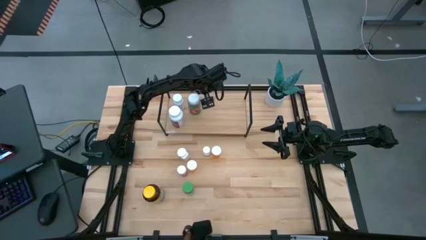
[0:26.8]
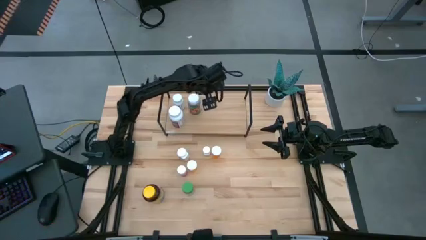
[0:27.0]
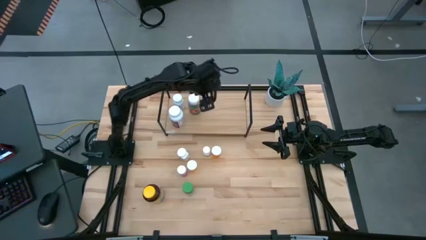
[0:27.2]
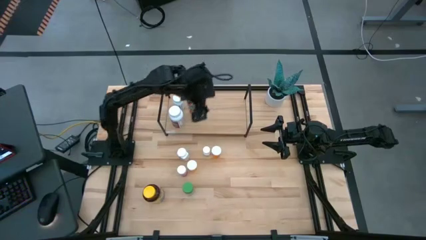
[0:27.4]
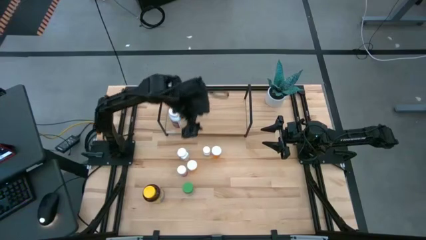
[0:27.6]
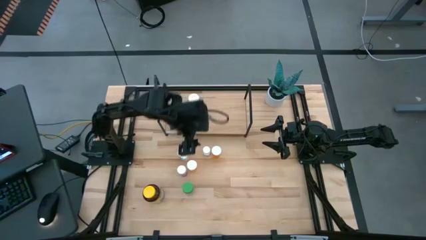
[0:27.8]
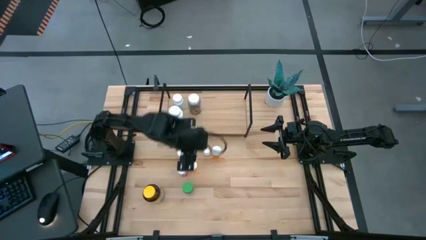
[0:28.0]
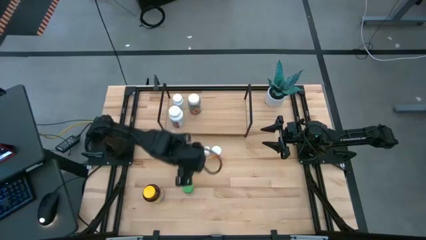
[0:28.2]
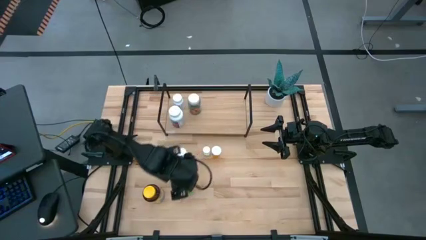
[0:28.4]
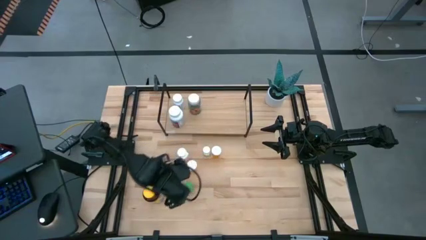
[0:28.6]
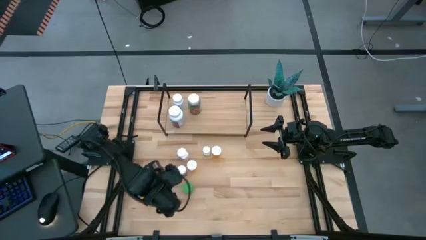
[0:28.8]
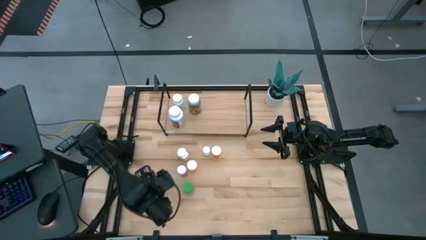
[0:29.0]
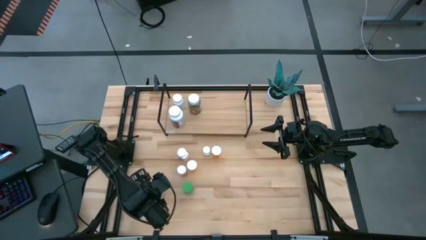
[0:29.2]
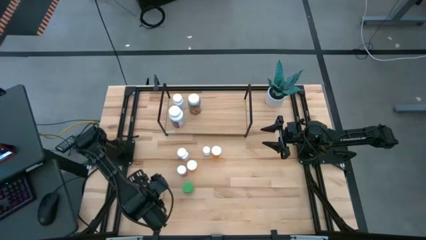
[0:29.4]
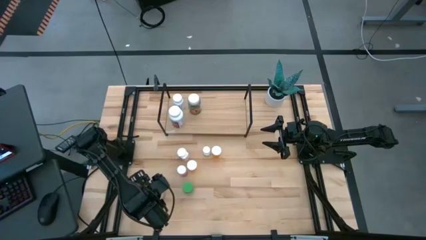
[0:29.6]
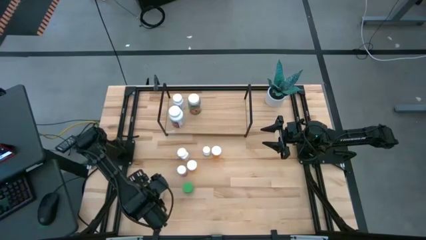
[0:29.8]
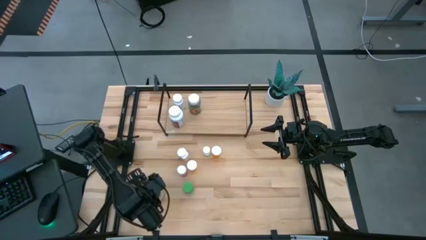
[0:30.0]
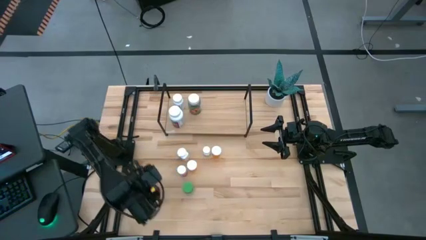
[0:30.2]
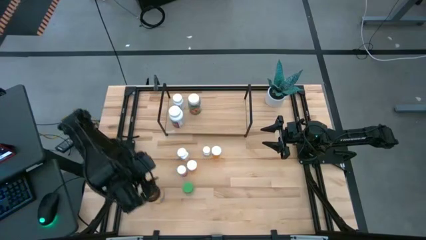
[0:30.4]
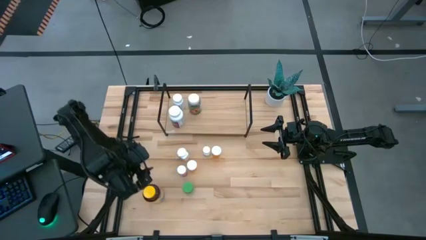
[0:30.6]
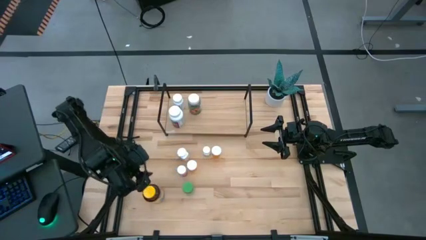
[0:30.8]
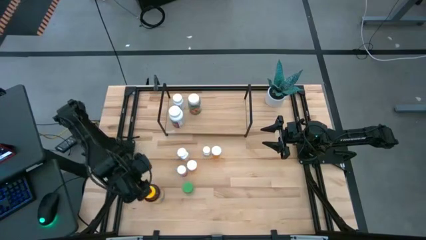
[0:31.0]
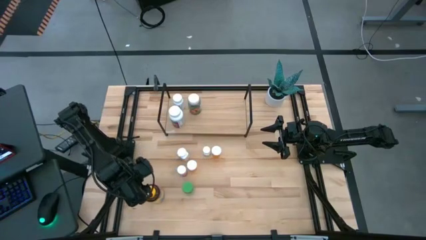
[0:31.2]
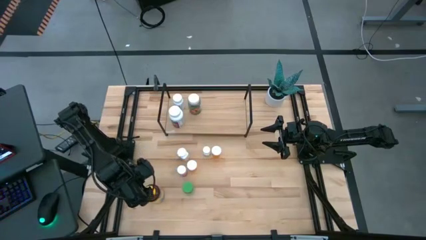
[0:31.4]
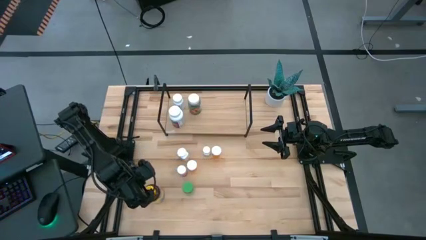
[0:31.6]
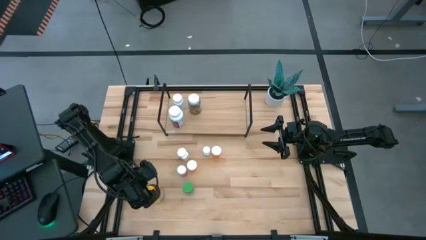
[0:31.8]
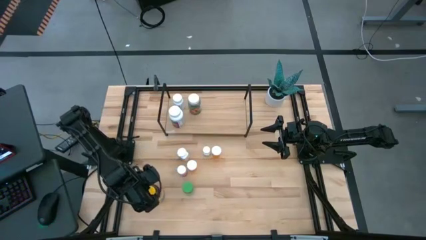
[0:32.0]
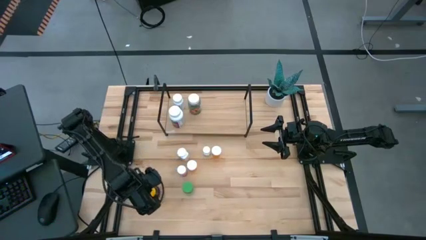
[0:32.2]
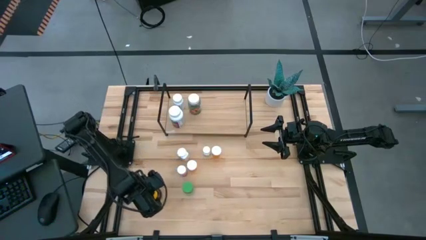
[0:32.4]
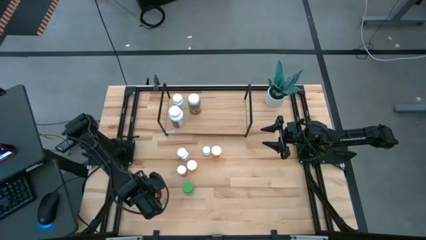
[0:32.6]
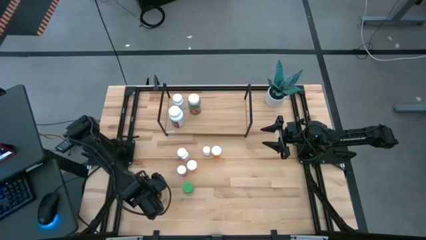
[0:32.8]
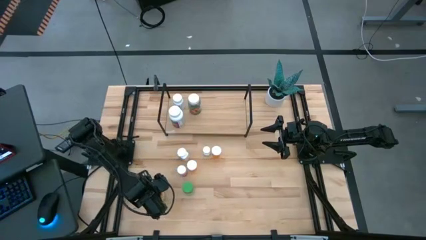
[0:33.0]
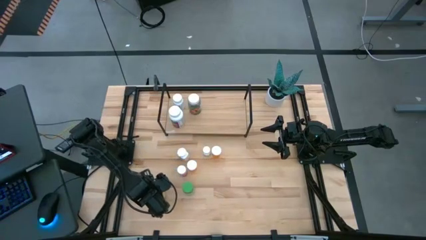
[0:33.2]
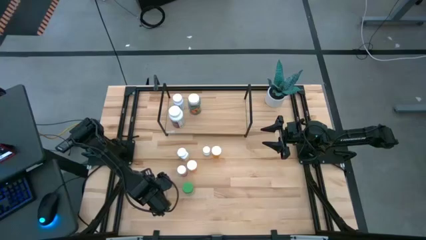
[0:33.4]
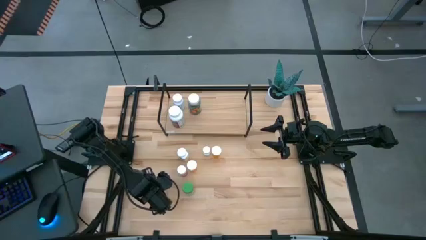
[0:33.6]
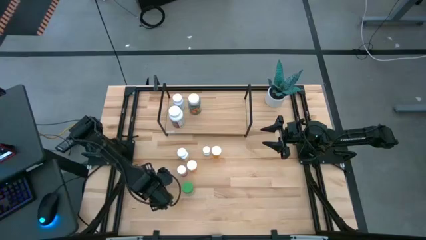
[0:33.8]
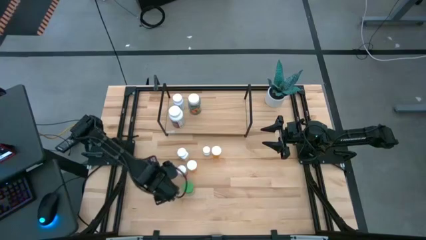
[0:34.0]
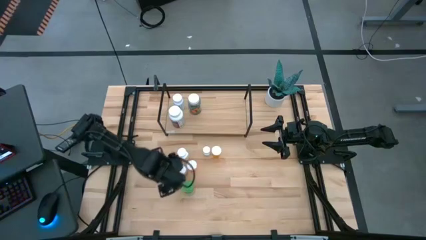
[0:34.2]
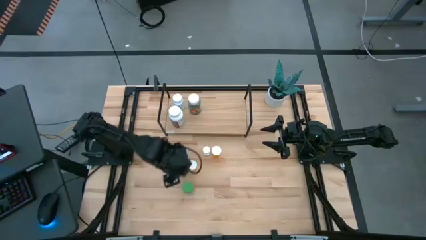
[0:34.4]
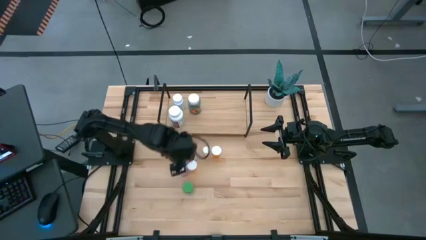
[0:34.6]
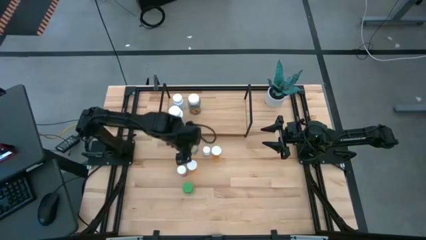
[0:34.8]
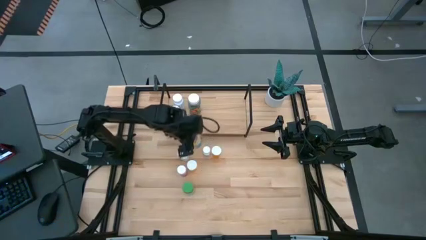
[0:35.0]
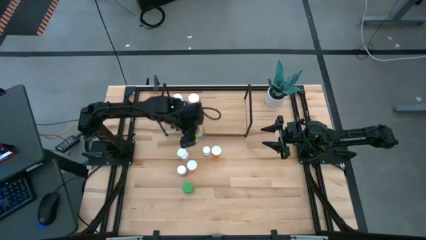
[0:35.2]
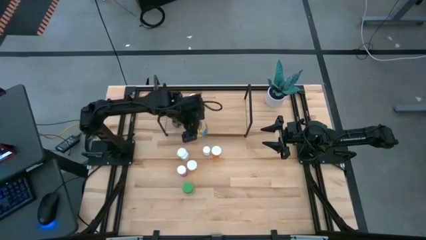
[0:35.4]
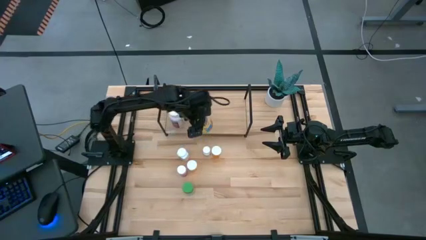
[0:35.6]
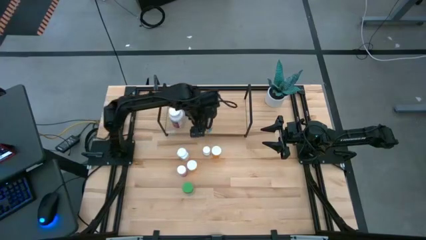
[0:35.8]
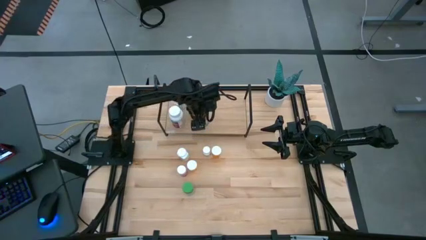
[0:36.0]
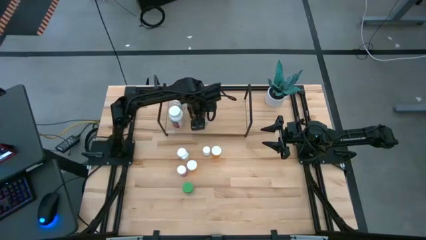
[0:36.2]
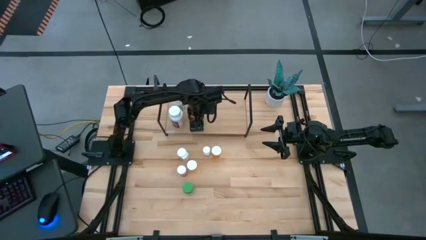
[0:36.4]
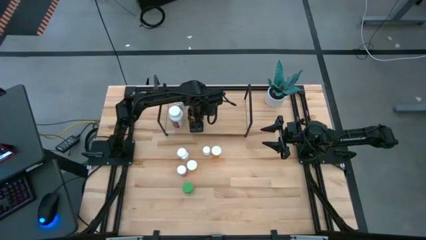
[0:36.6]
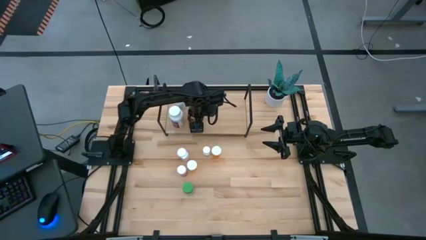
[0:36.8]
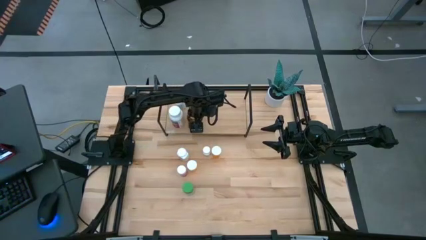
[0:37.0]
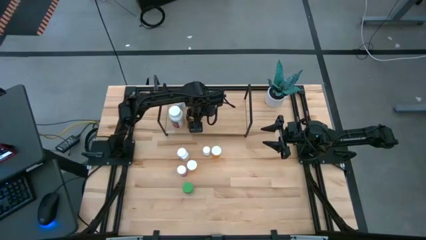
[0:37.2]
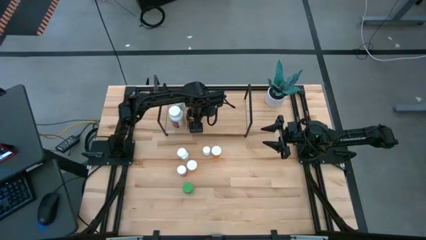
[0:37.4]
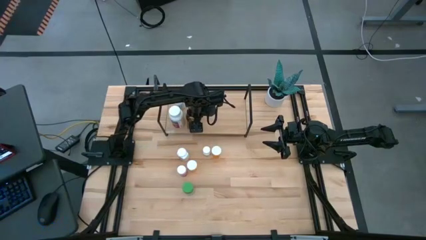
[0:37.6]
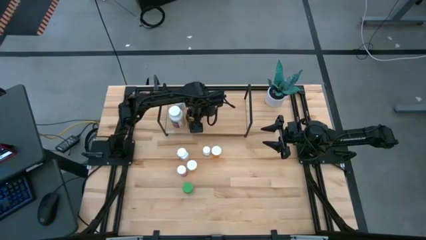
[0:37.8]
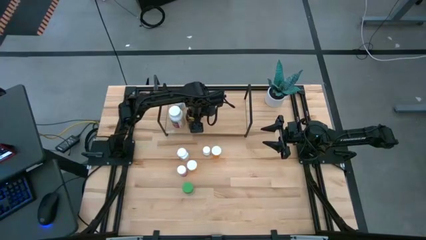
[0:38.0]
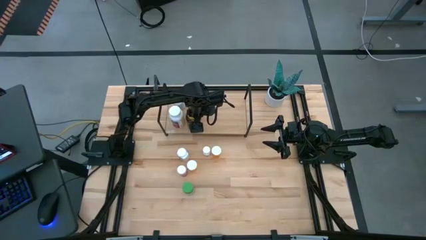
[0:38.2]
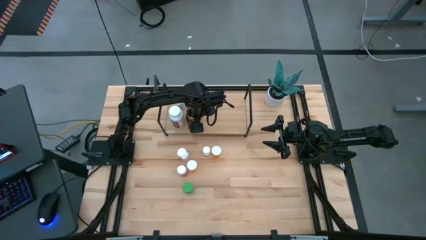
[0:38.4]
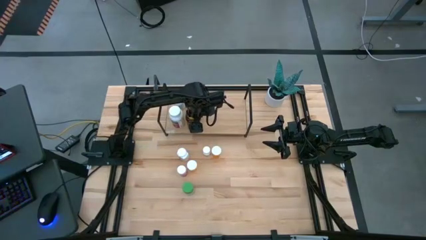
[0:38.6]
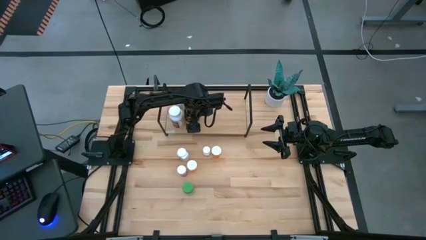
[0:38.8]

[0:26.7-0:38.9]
Task: Pick and place medicine bottles onto shelf by color
Put the yellow bottle on the shelf

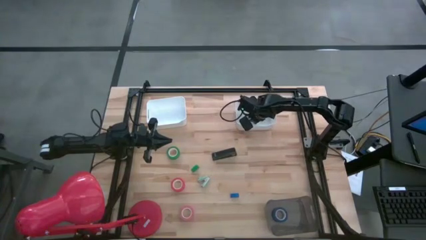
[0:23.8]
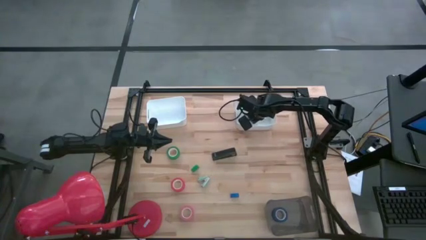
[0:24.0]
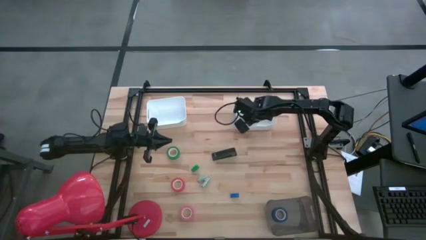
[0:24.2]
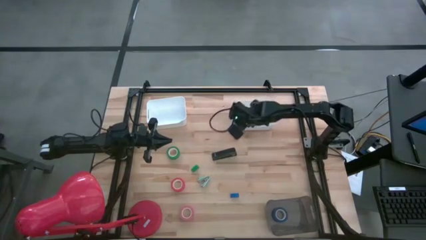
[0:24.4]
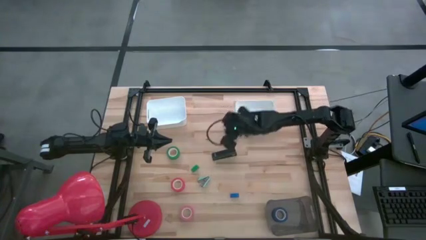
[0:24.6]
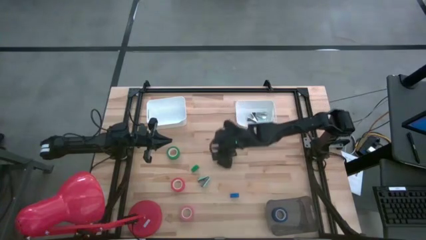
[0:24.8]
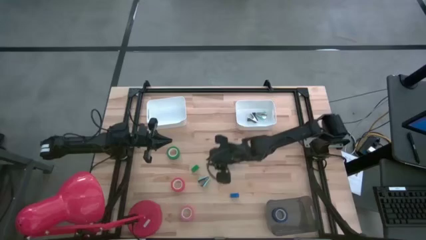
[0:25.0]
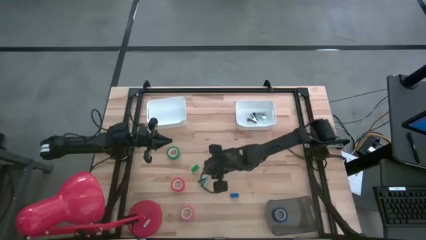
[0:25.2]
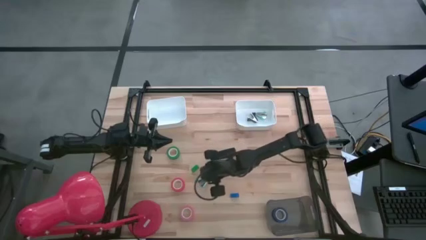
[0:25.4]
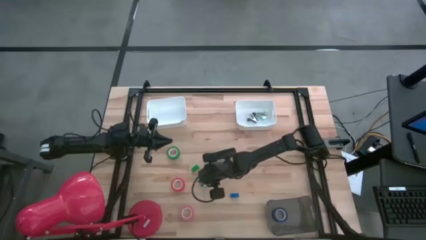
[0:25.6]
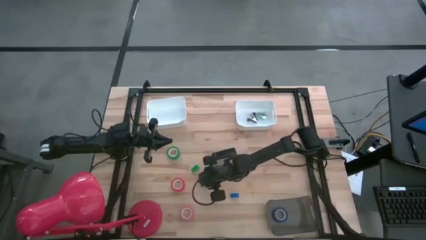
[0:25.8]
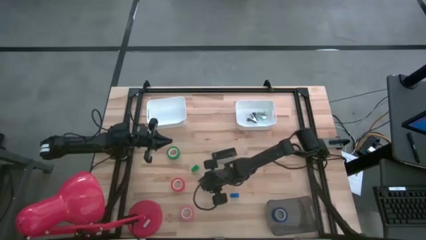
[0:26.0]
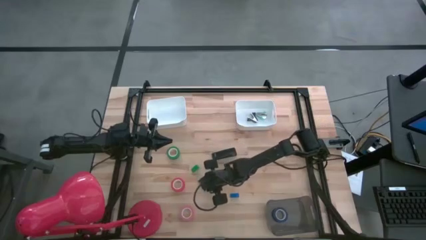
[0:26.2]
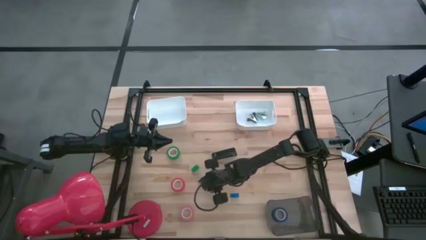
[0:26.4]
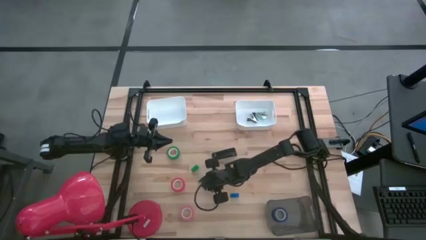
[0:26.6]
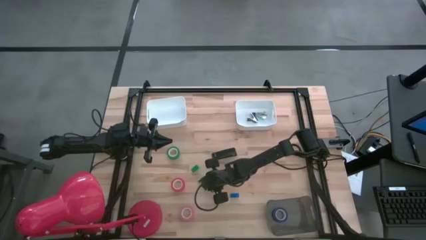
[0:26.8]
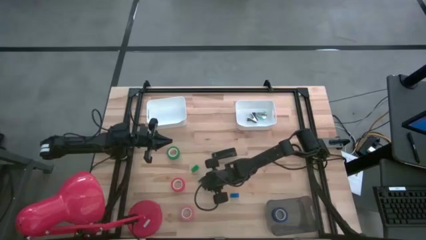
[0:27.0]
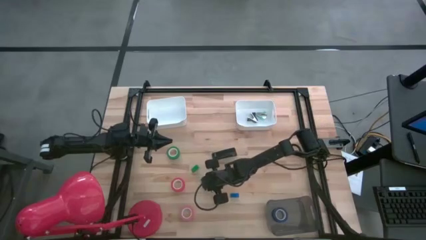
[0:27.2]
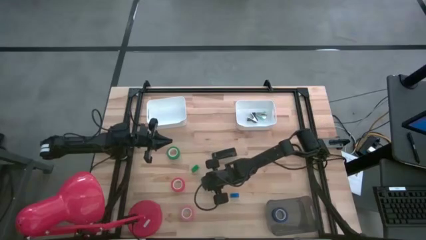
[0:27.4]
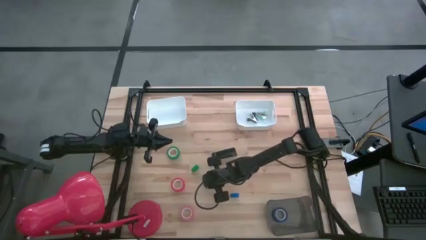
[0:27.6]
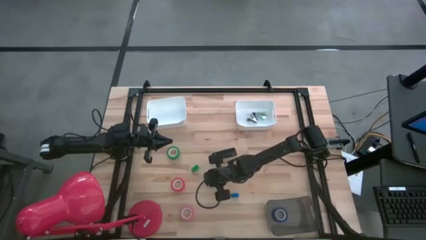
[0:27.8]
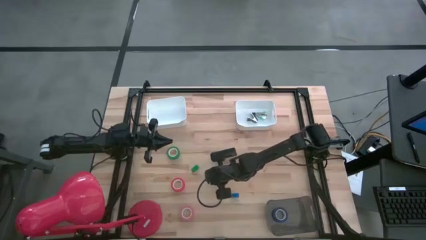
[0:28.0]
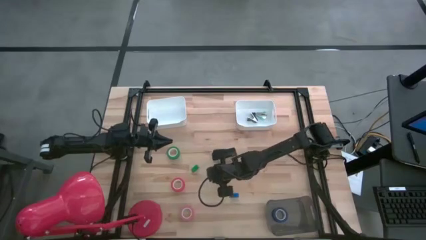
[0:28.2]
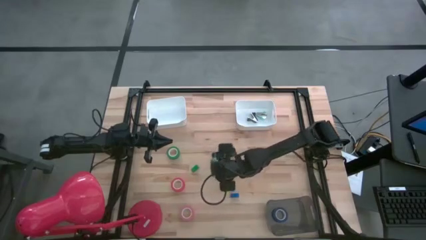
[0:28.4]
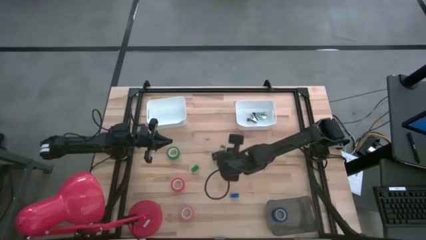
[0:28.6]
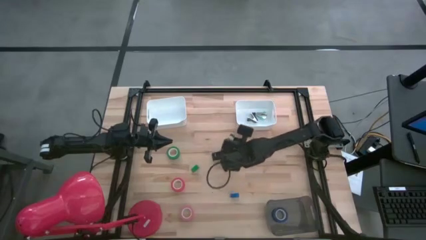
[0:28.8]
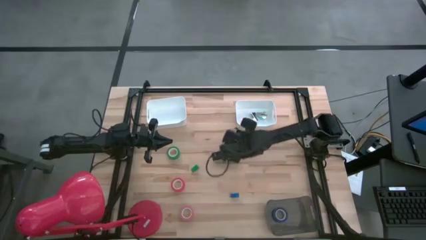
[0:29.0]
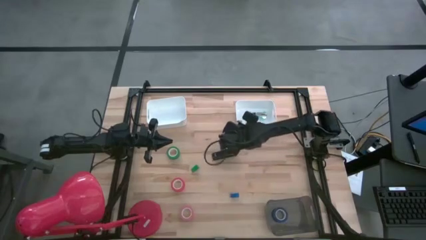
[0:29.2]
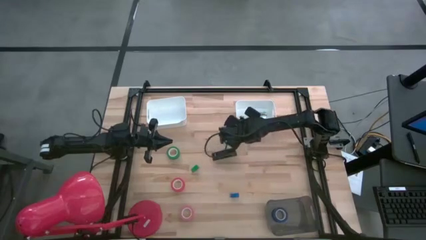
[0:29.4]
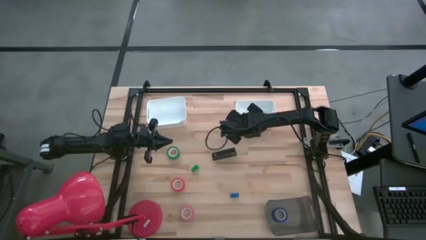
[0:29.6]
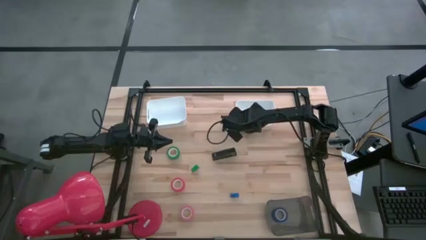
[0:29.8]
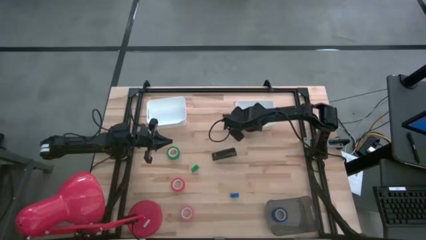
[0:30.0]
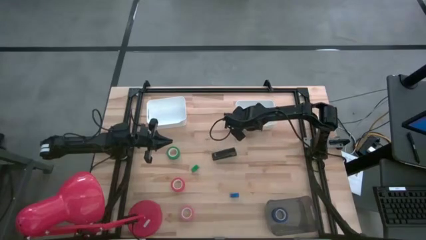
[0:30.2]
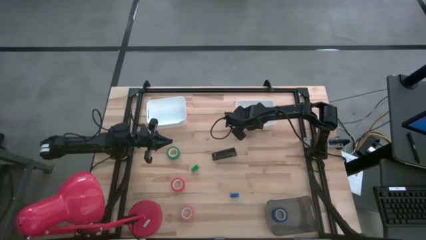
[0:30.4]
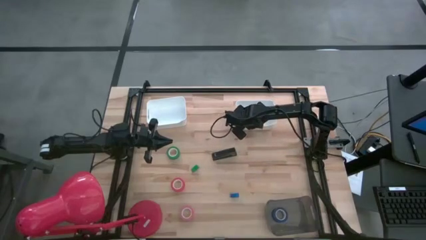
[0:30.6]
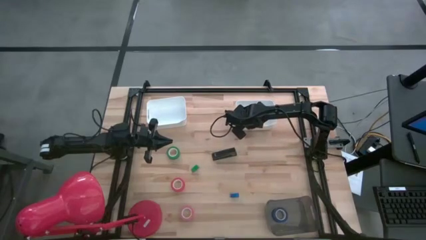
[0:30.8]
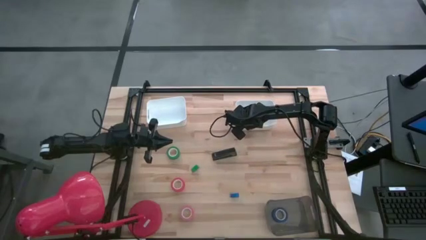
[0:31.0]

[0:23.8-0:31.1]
Task: Pick and place Stapler, Stapler remover, tape
Put the green staple remover into the right white bin
